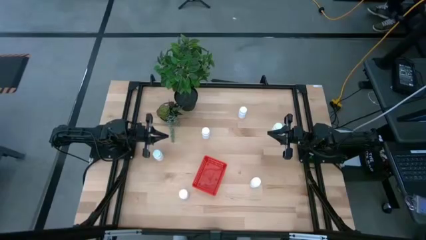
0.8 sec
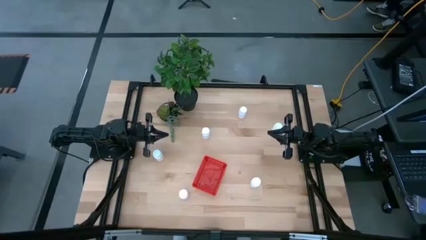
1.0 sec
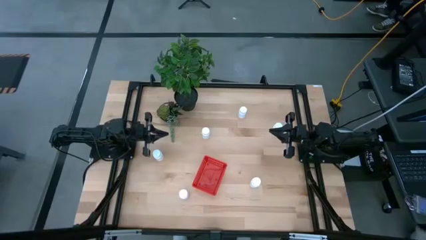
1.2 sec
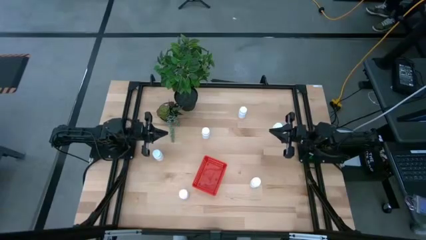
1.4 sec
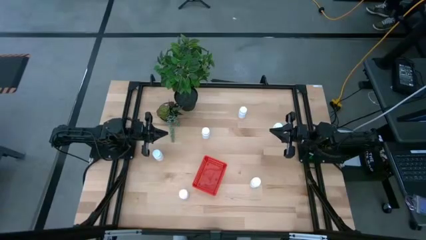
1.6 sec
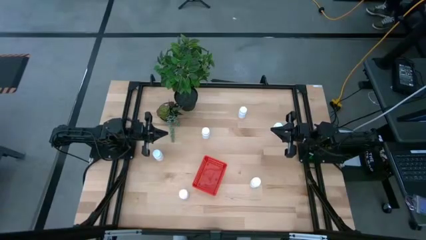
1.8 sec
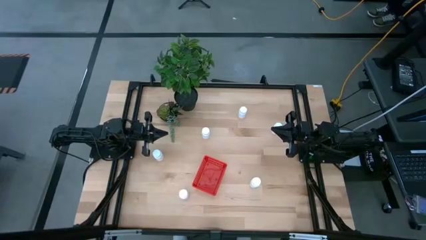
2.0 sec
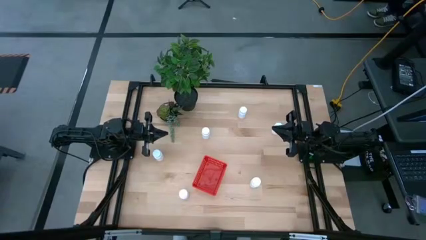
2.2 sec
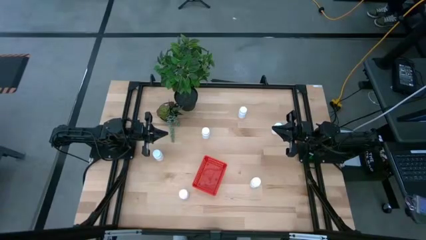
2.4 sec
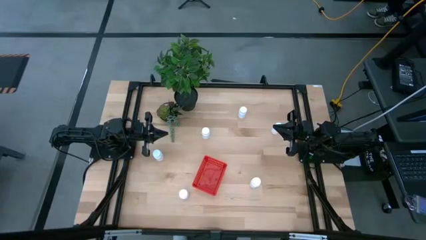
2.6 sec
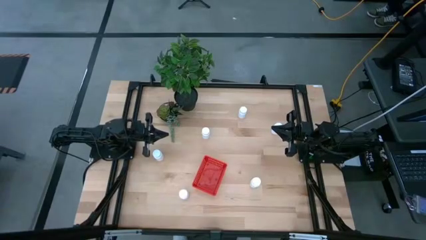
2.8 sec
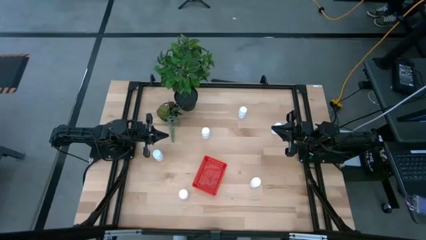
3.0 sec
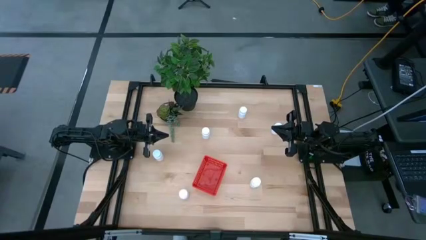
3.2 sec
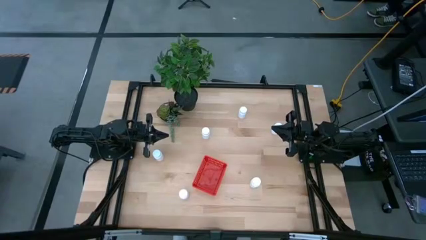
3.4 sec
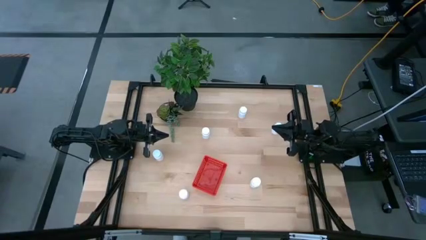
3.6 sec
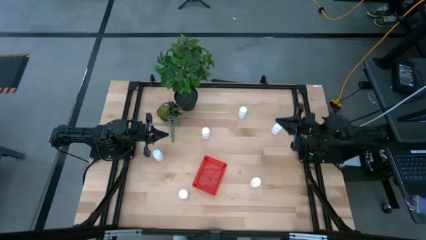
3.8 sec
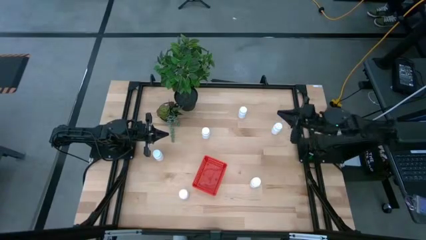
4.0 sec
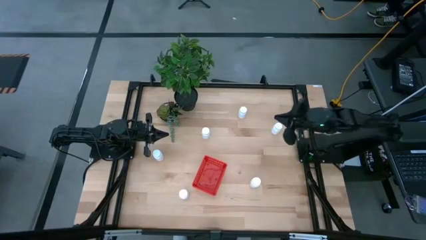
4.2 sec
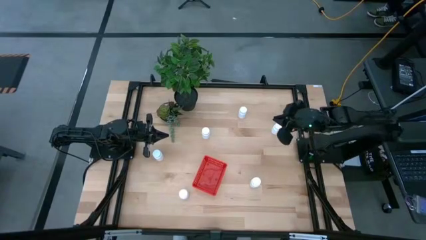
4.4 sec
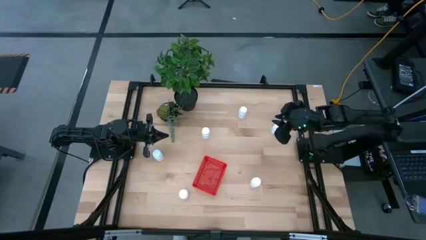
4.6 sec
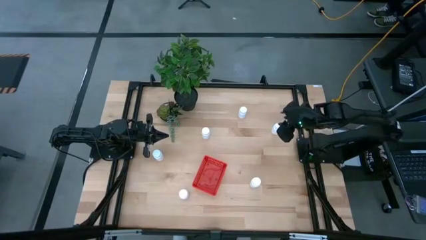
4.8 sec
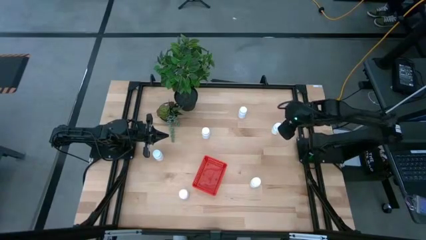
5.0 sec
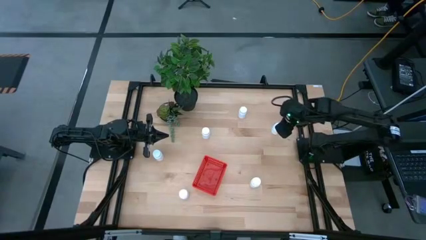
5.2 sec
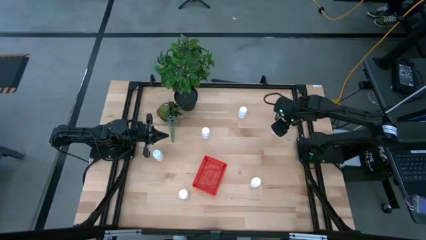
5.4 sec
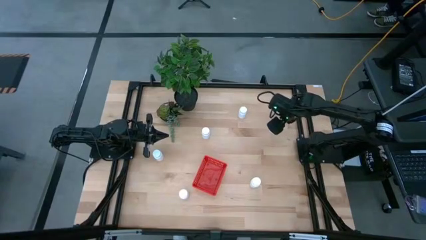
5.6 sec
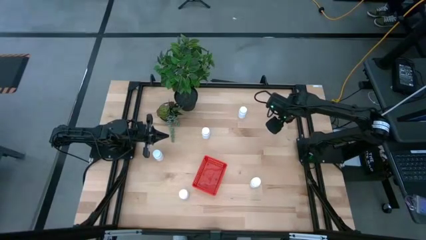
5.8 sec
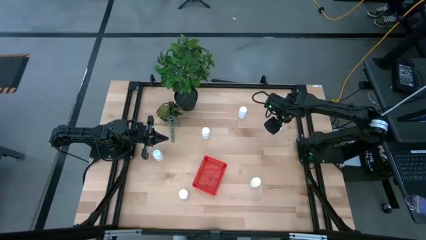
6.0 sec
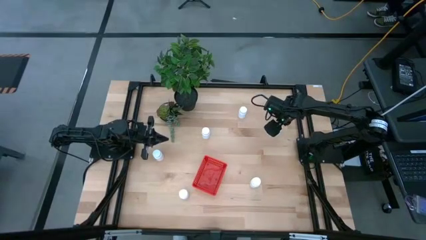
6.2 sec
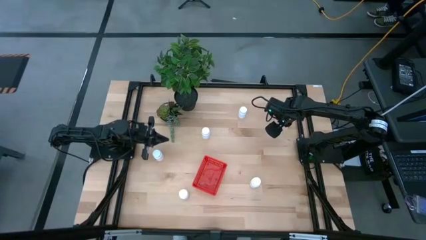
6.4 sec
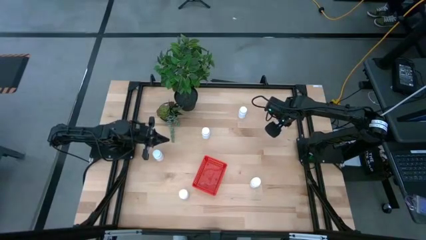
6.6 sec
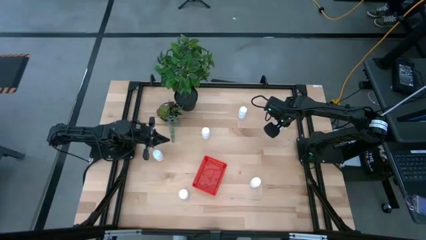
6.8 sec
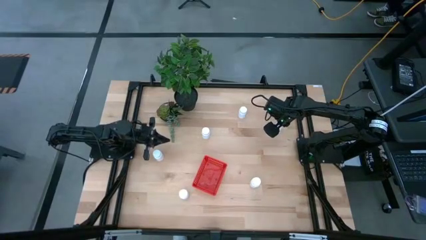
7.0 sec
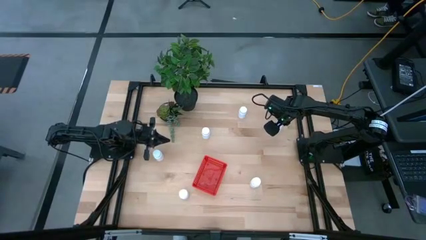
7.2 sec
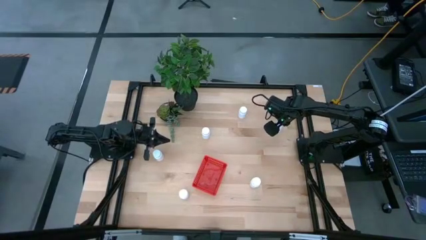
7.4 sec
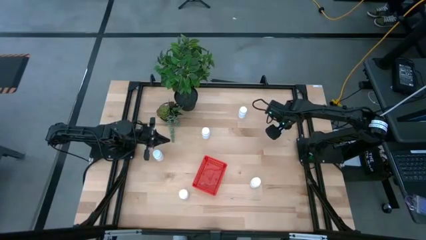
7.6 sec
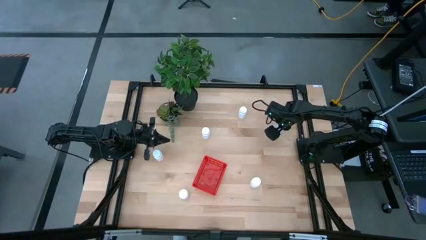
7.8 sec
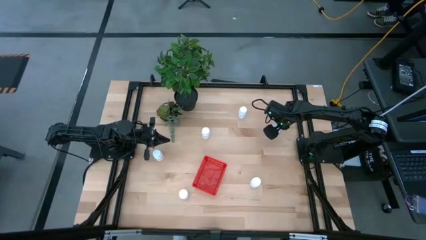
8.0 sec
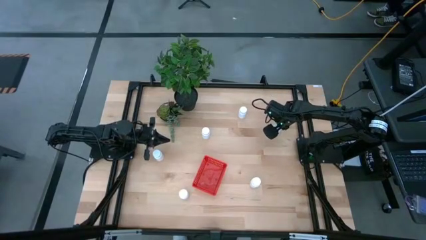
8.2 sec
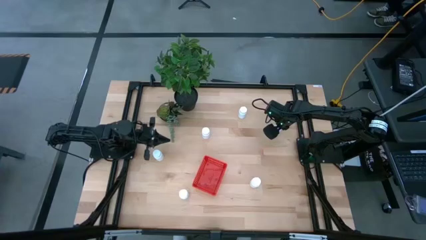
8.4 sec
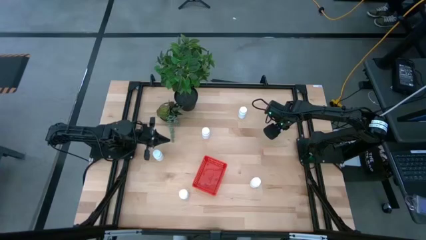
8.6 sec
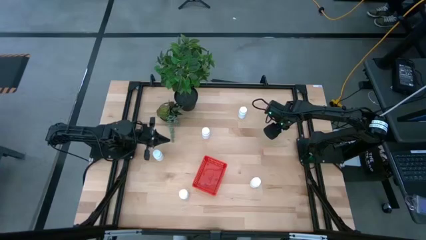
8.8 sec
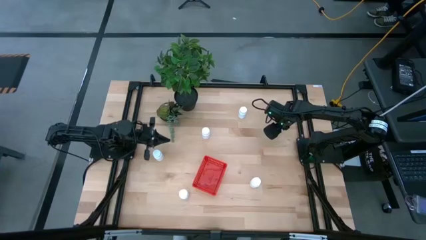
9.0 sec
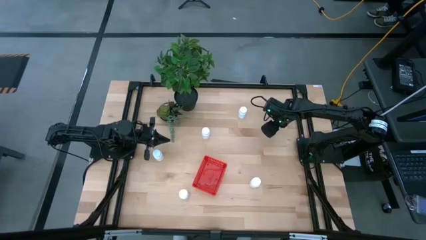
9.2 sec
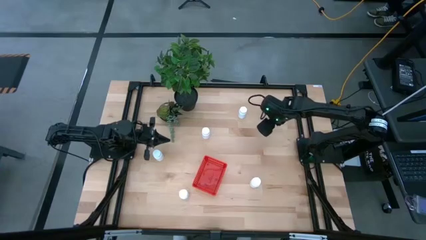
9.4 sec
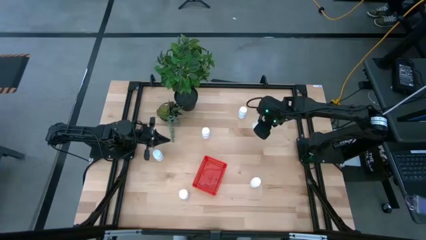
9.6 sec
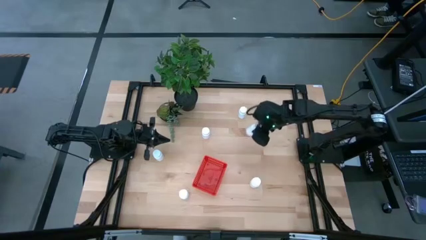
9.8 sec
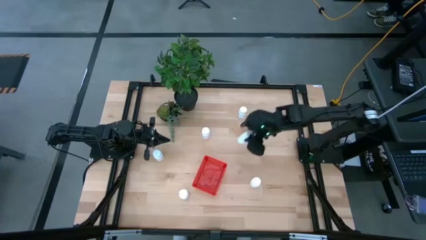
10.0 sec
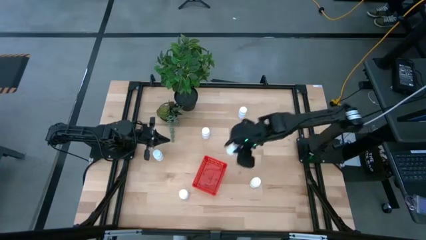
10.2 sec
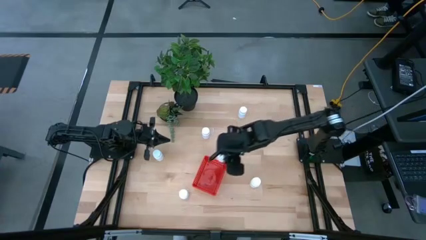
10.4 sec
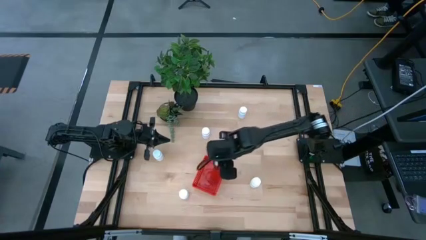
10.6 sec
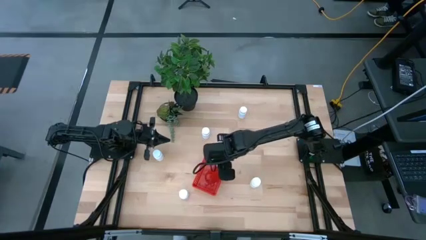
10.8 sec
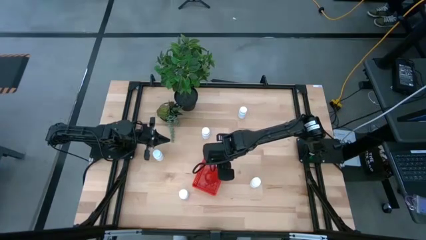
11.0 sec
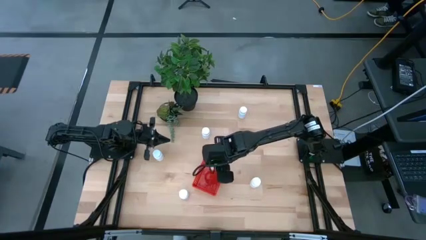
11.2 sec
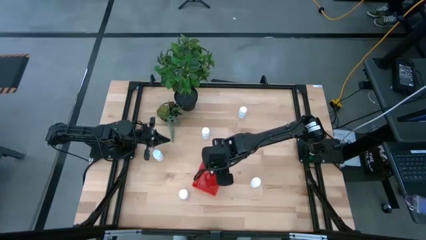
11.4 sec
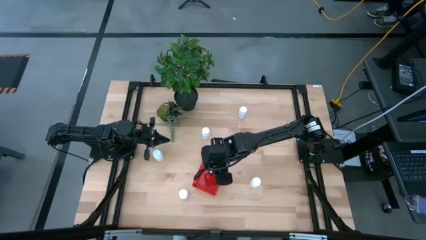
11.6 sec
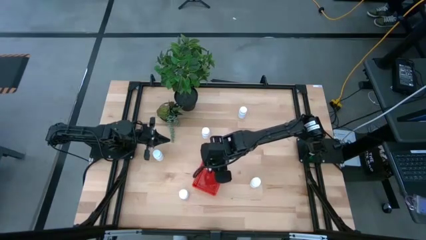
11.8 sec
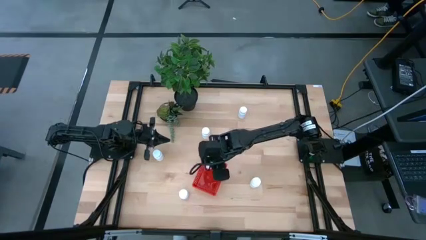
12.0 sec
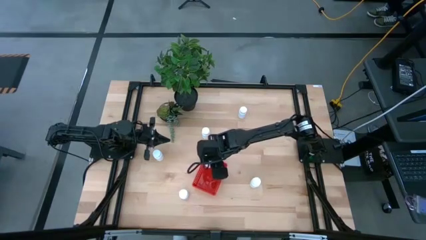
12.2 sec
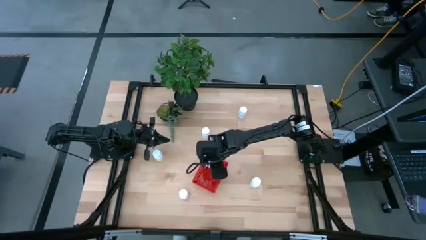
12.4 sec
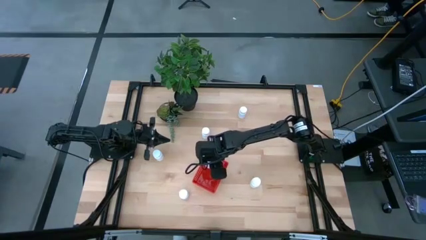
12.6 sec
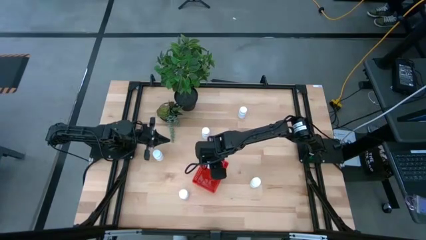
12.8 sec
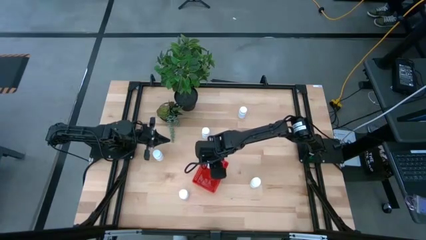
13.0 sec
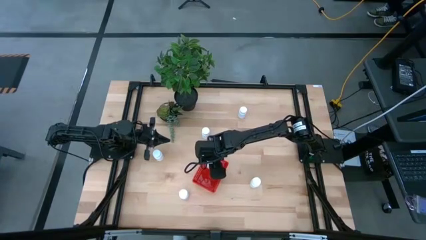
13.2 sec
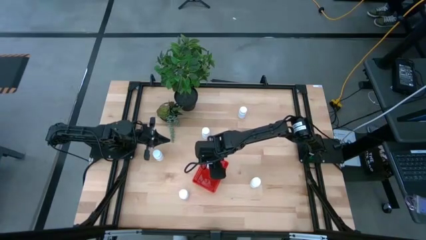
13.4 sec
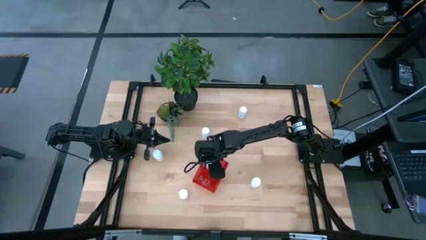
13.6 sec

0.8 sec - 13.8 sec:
Task: Pick and place pill bottles into a basket
Put the white medicine bottle into the red bin
